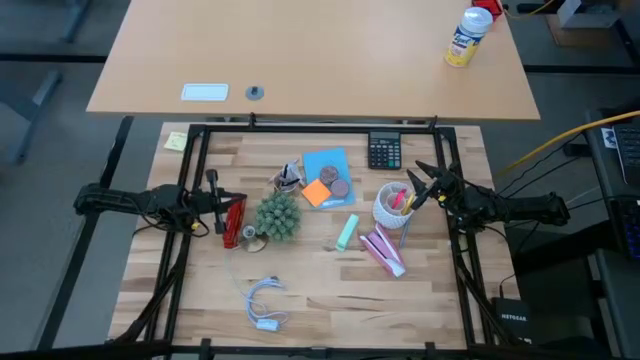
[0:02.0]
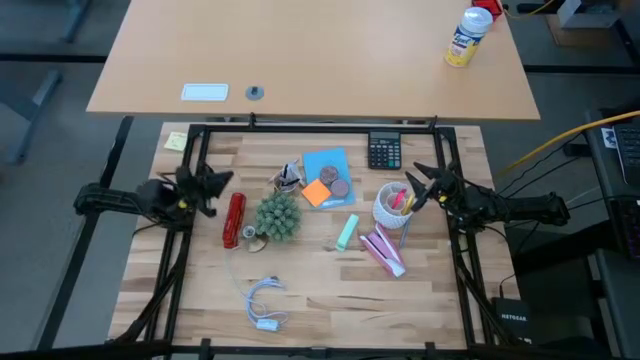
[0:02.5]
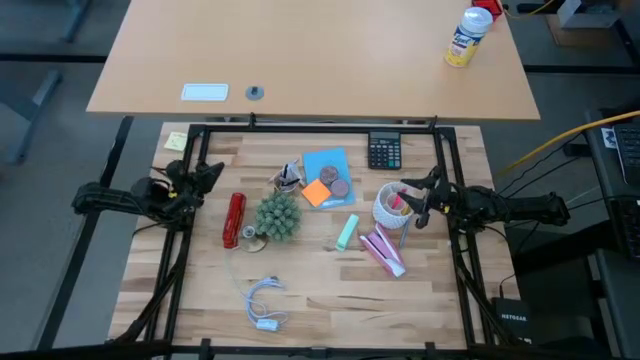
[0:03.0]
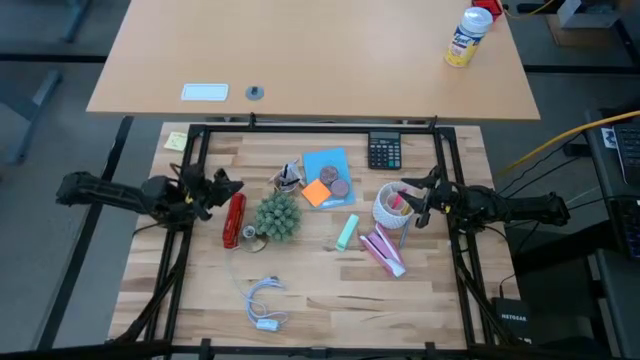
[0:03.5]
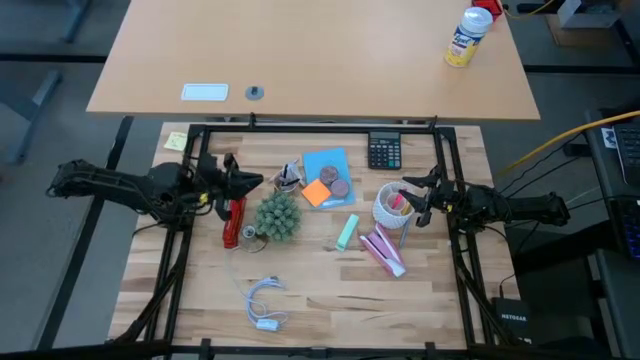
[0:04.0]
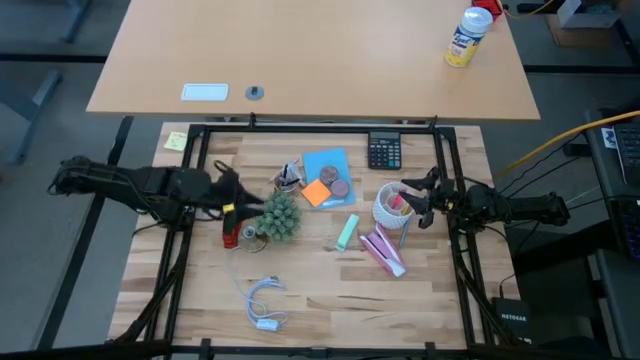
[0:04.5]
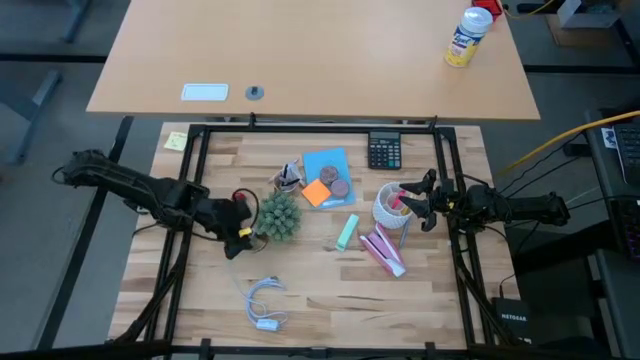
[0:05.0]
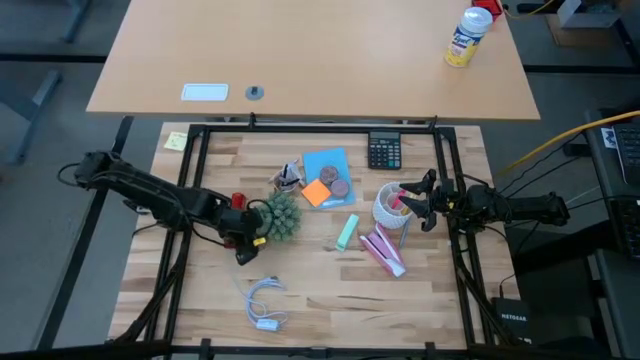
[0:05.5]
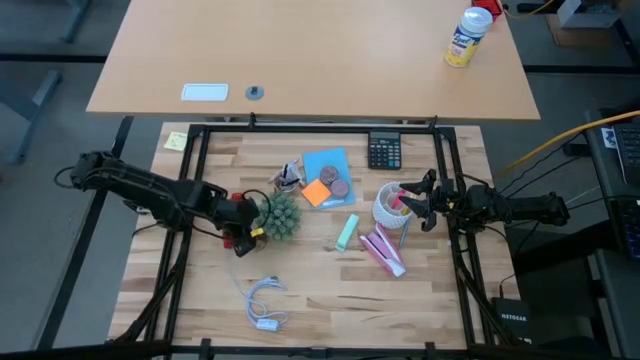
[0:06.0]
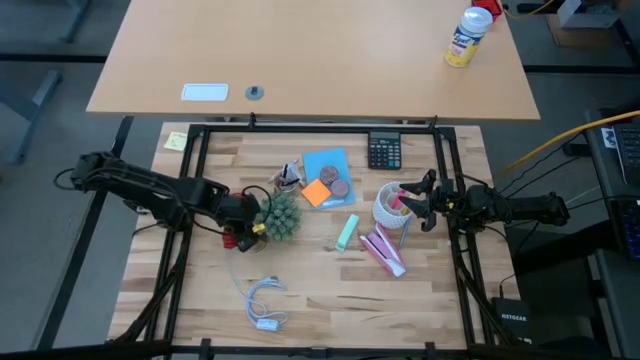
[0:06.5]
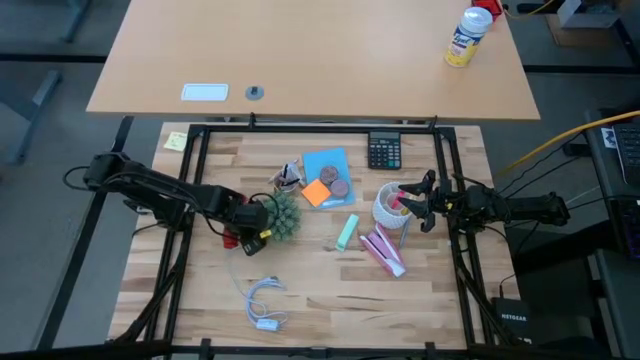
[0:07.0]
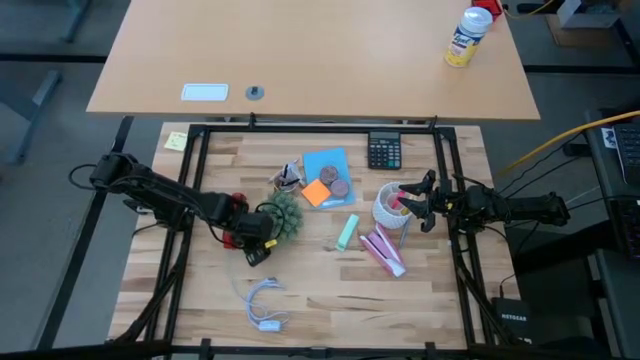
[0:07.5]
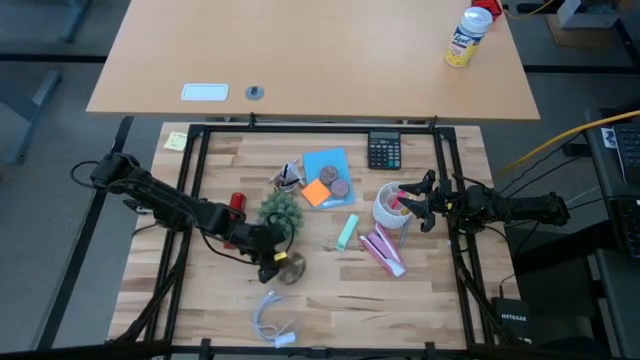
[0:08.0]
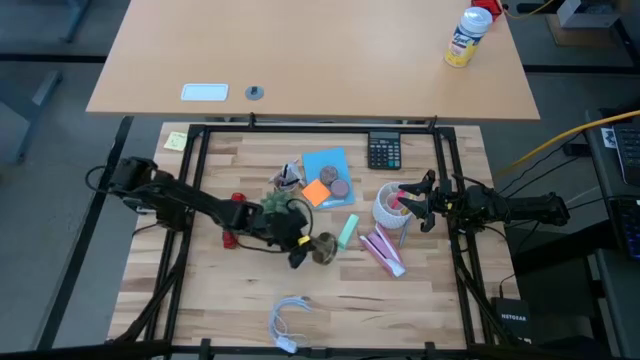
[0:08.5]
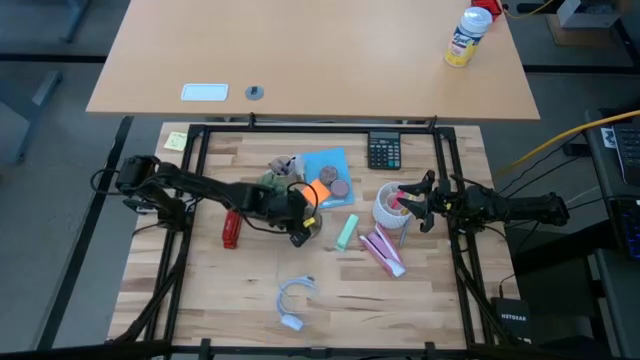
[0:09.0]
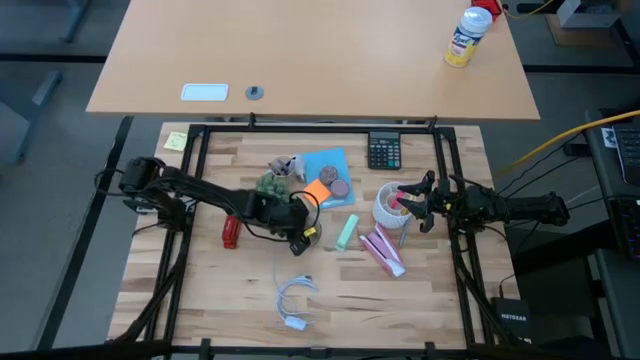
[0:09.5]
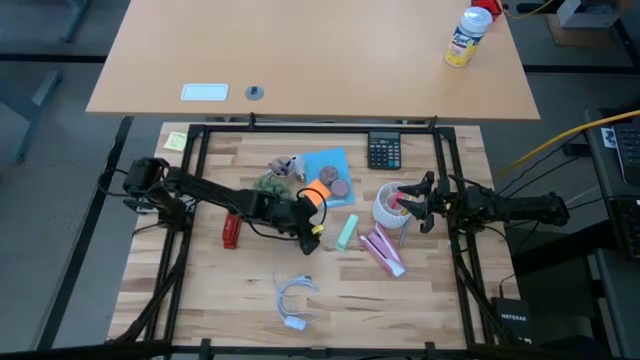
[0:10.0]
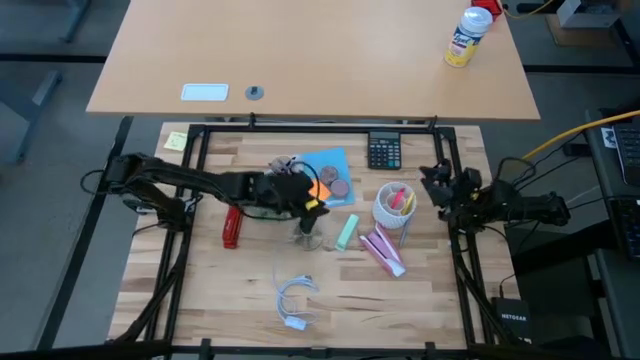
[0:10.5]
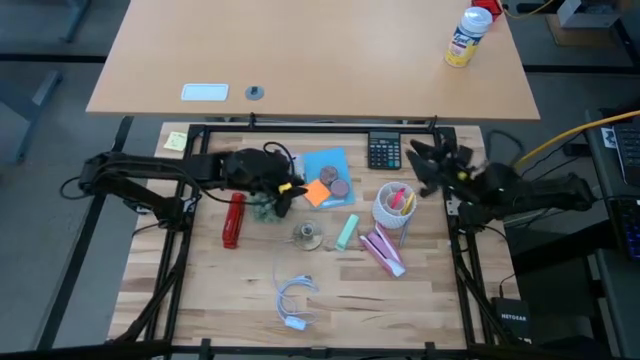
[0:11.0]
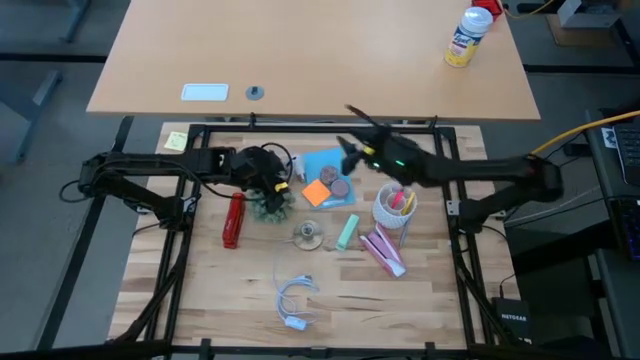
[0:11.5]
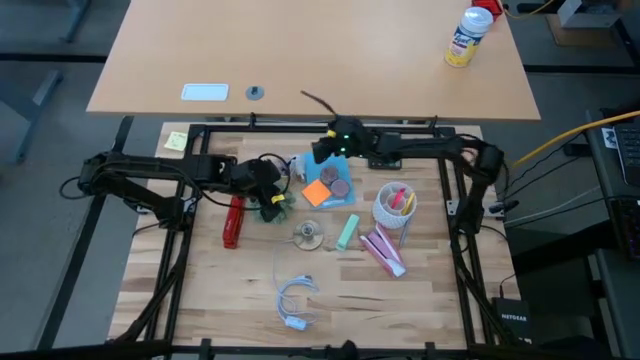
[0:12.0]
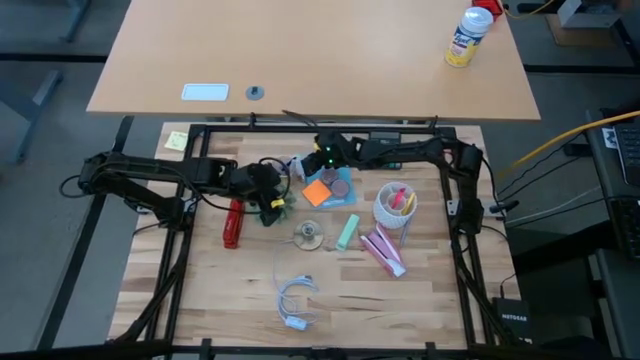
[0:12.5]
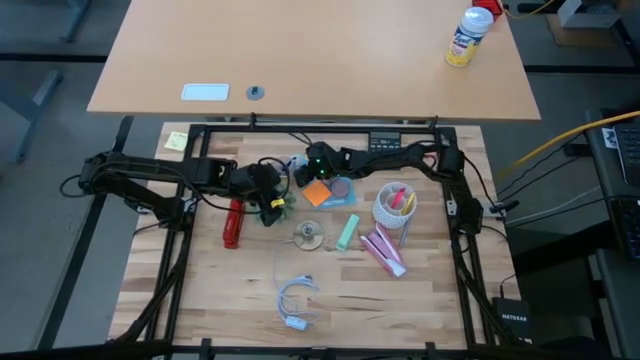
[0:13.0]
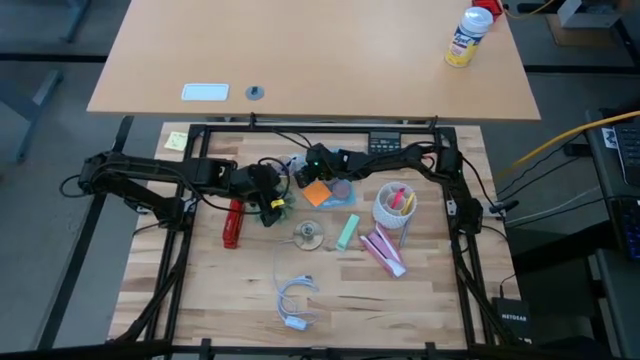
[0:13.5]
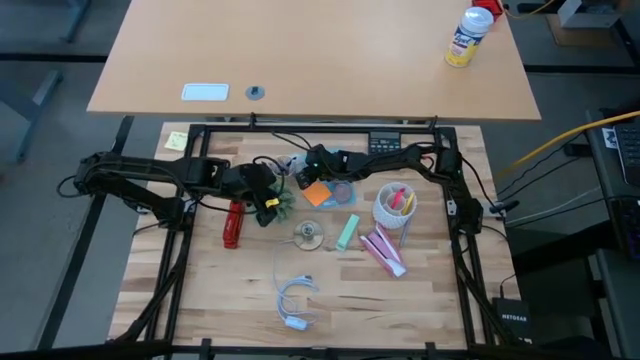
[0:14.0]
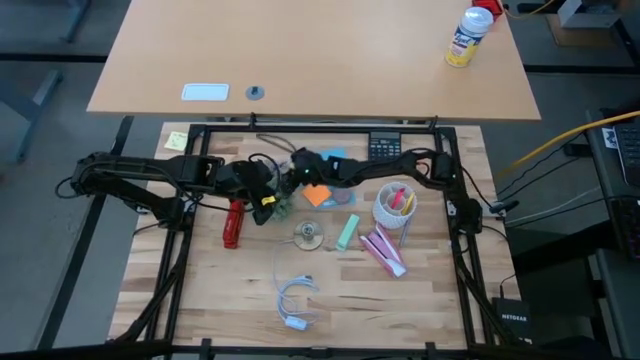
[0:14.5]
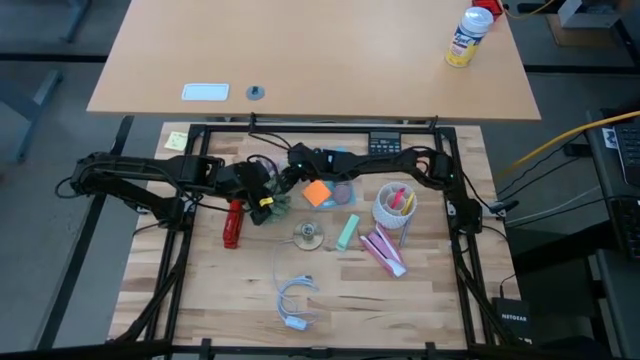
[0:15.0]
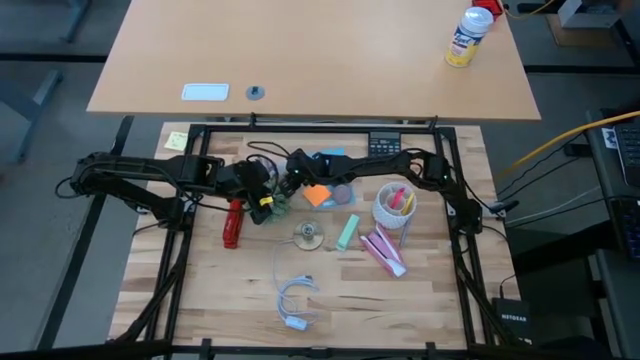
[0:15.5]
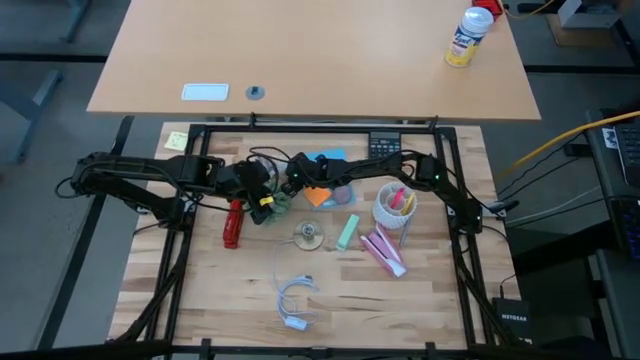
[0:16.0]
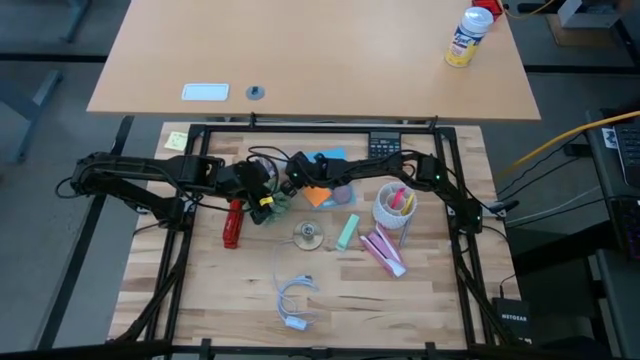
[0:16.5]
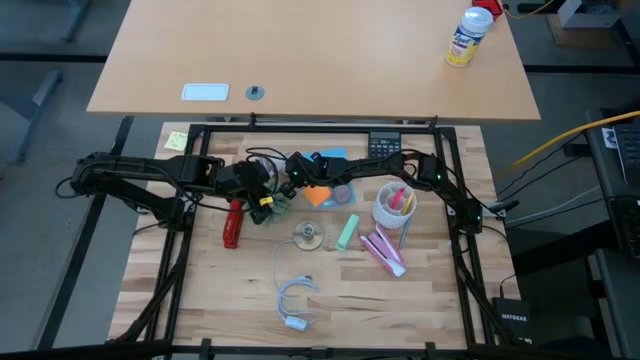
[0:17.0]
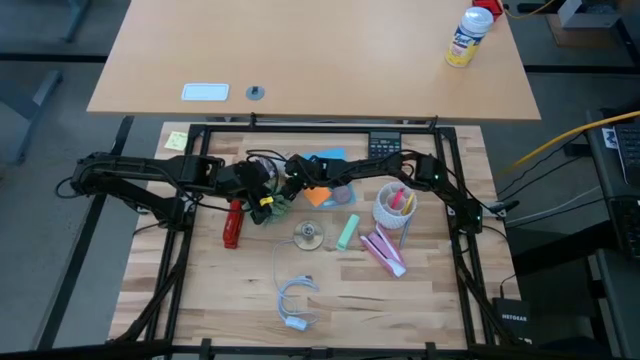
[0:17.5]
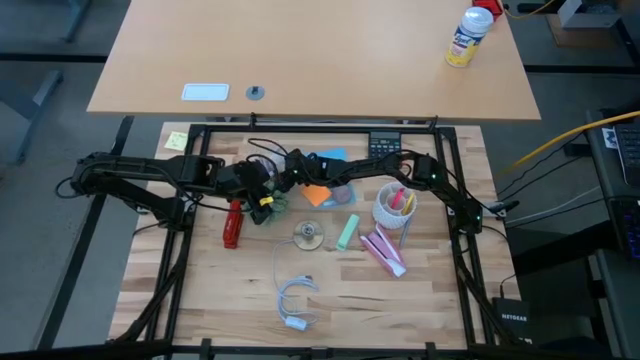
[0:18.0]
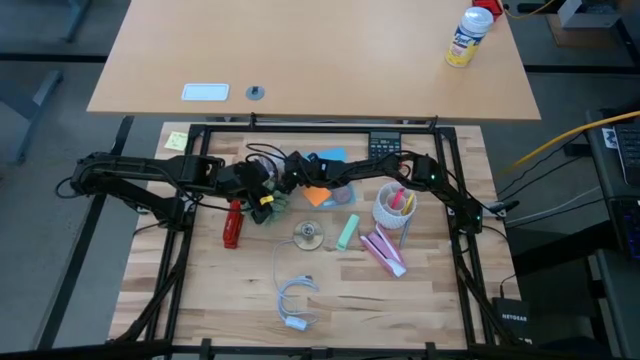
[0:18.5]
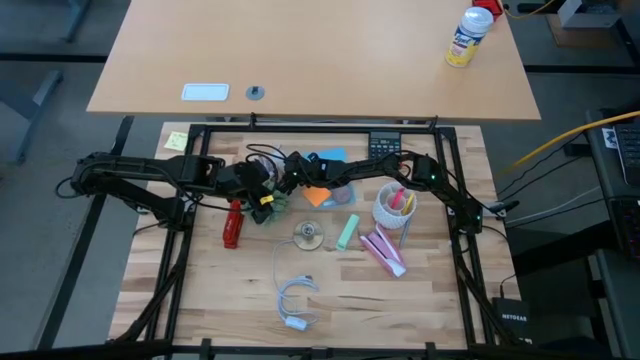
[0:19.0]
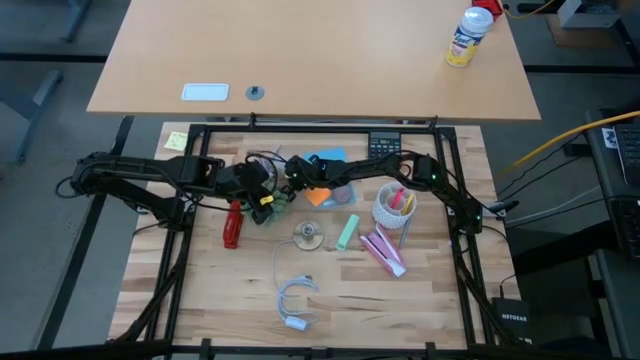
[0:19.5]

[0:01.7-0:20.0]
Task: Screw lightbulb
Insert the white lightbulb into the lamp socket
